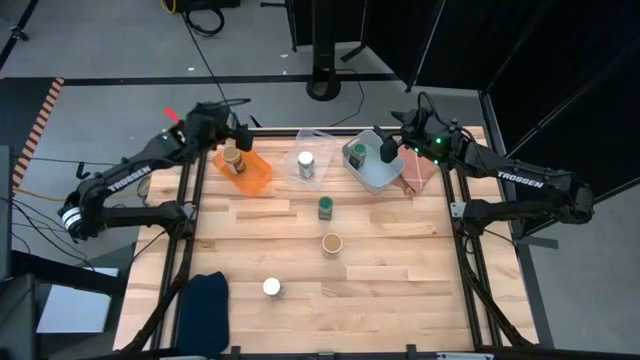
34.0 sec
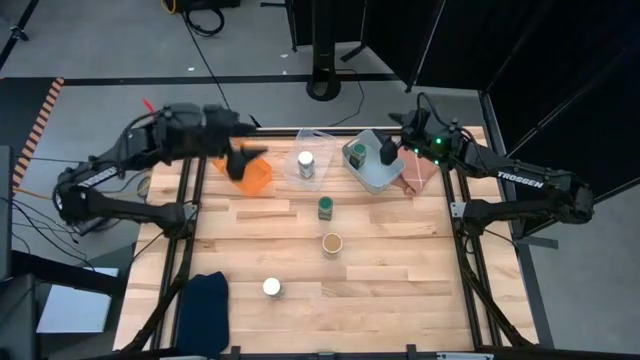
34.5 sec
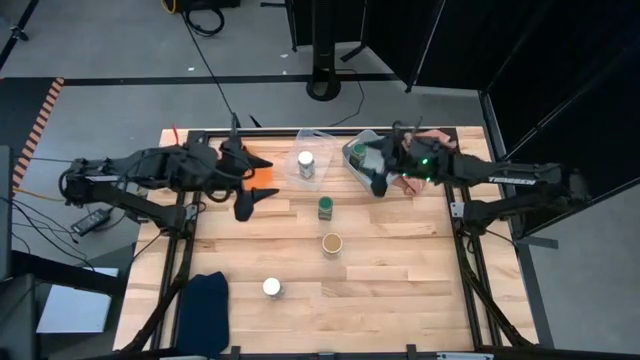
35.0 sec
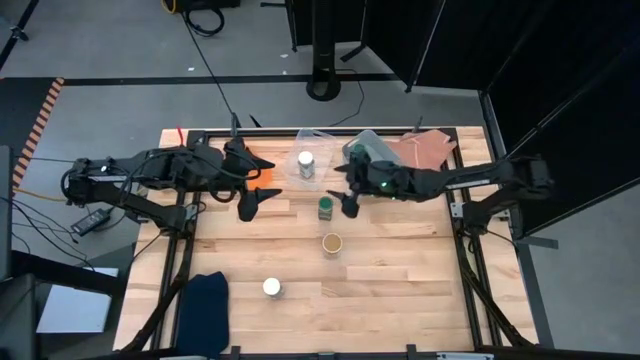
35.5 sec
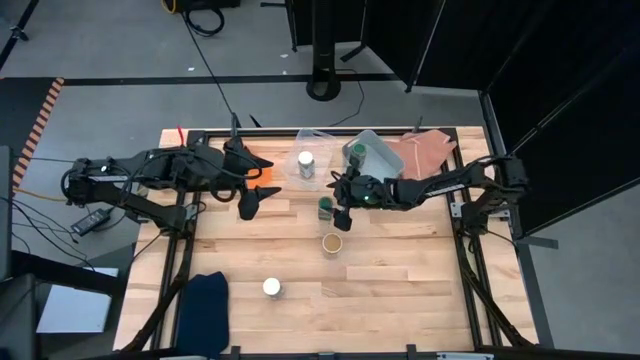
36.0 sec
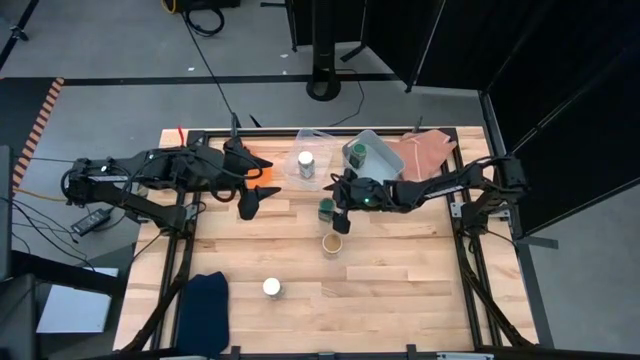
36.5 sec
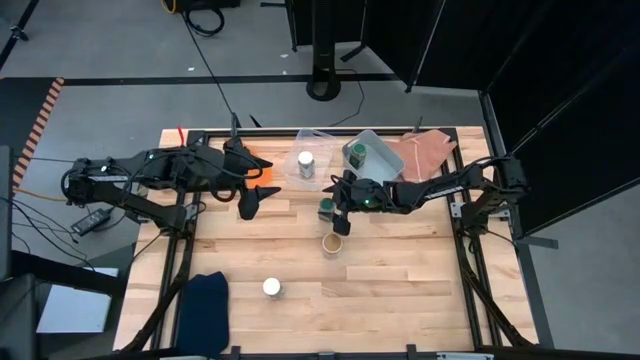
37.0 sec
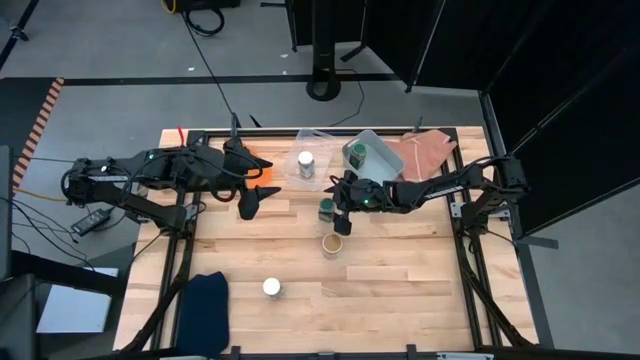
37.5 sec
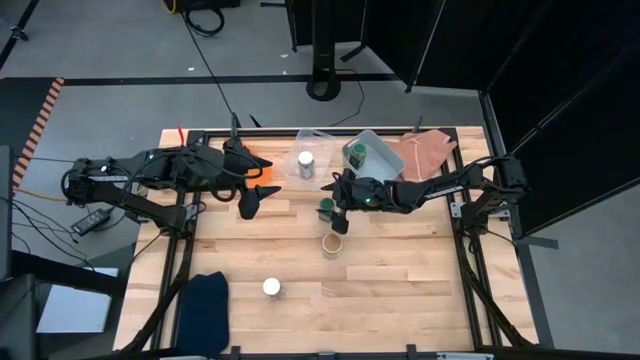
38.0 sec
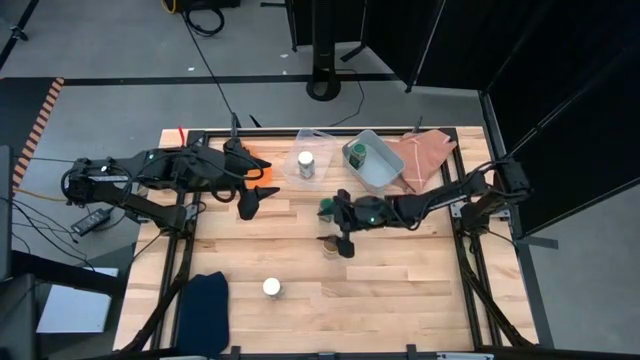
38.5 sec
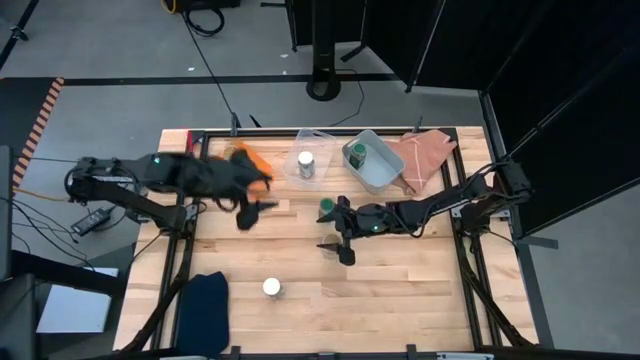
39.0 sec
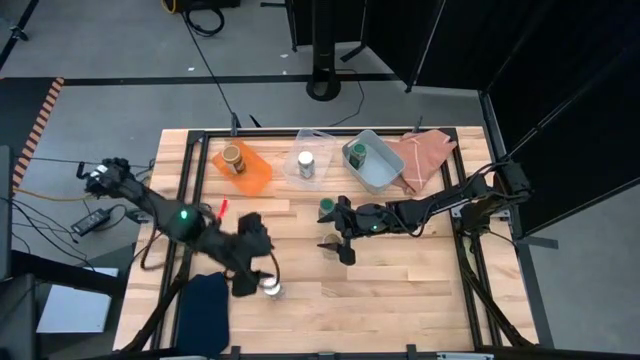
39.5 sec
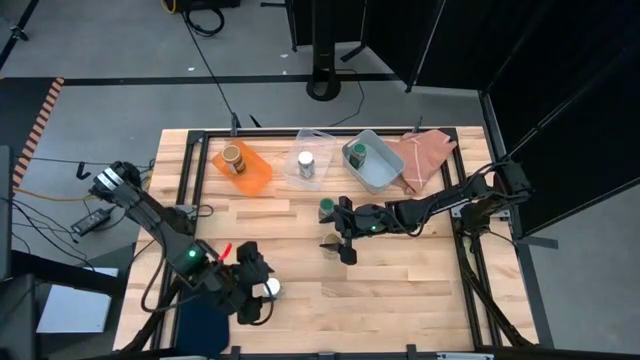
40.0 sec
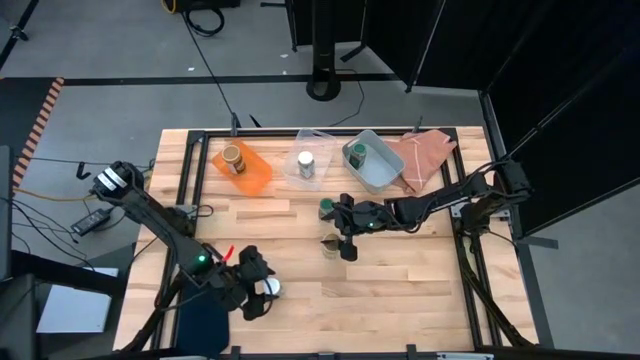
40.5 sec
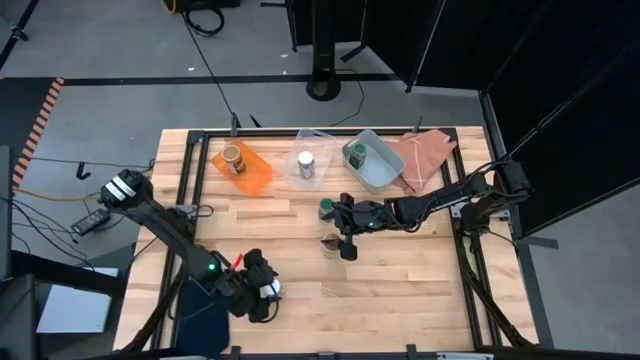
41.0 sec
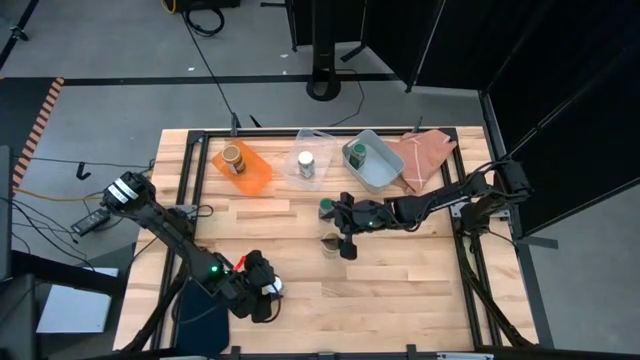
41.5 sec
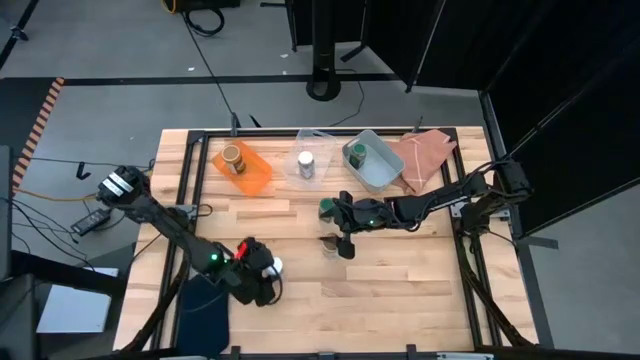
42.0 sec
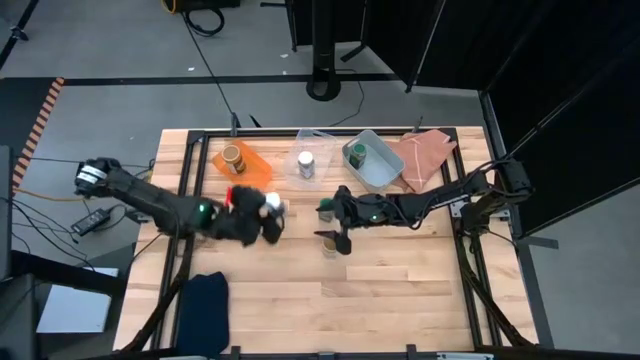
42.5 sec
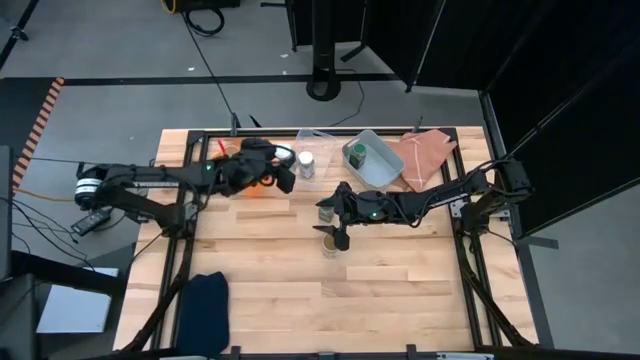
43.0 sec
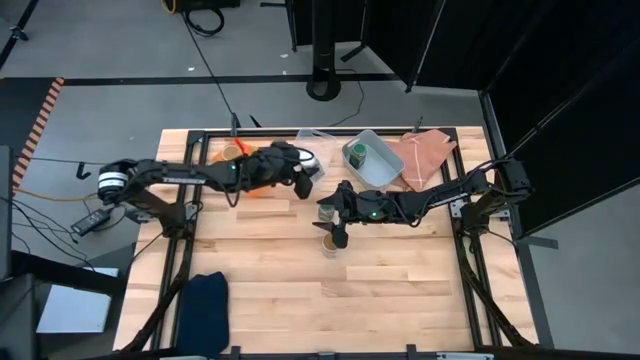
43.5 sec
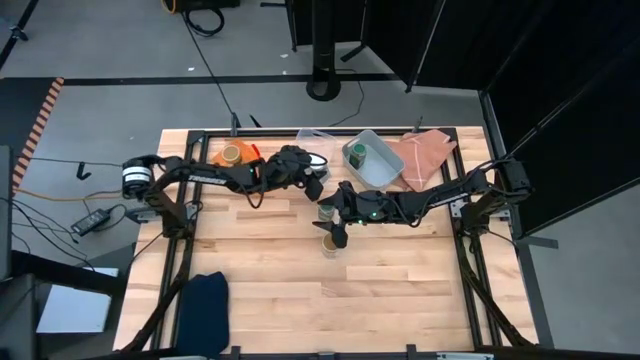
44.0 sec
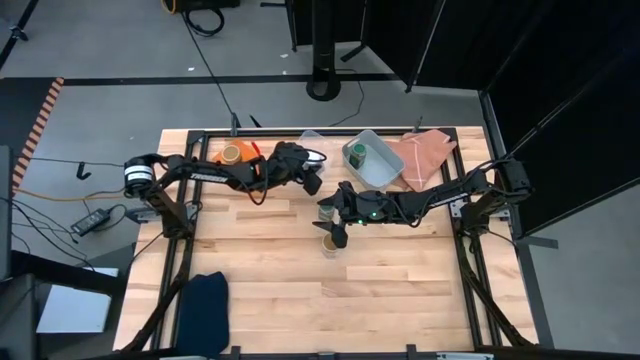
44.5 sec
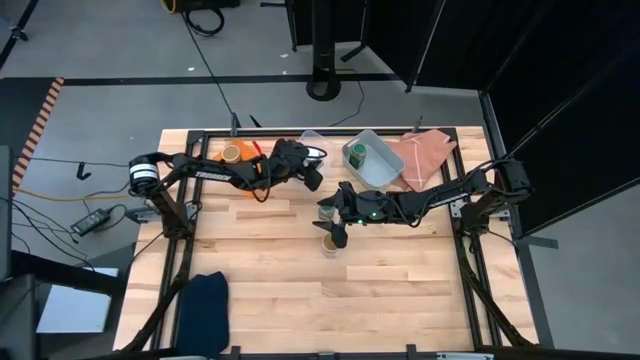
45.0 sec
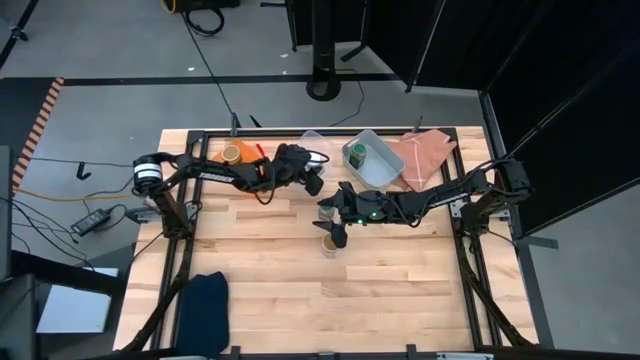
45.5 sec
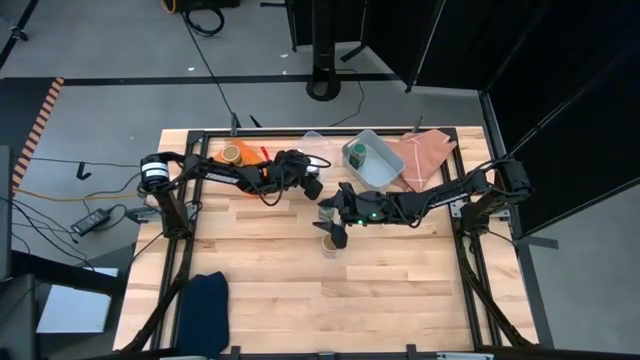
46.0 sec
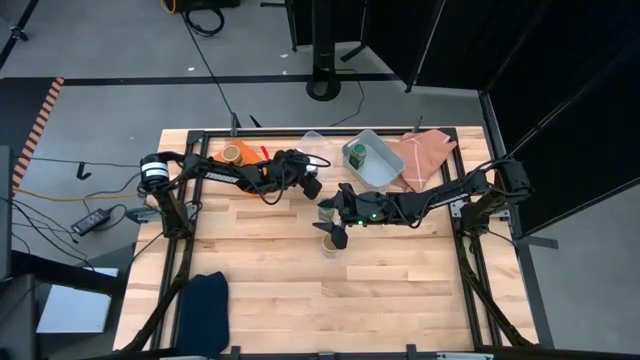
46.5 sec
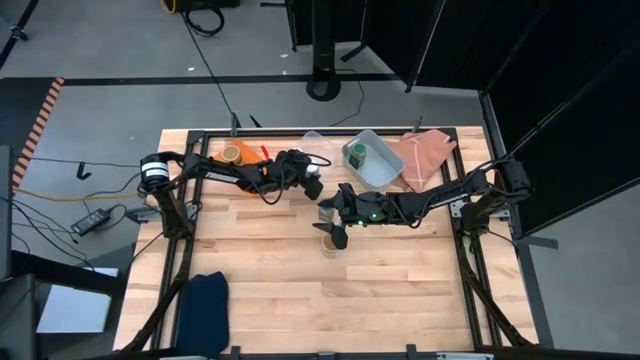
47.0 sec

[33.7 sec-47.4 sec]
Task: Sort spices by type
Put the white seasoning bottle into the transparent bin

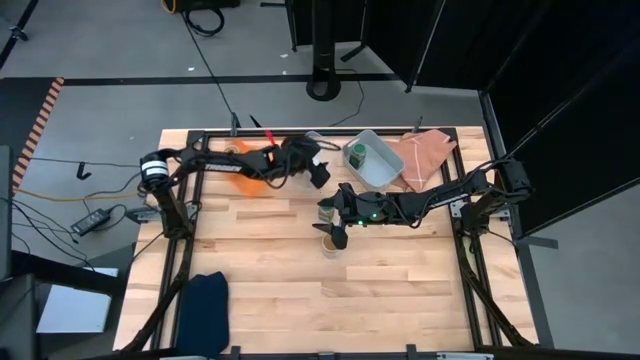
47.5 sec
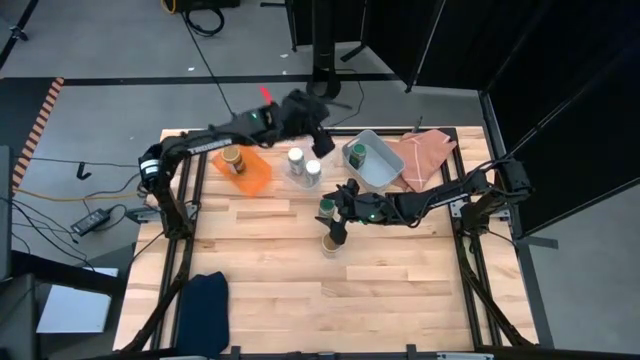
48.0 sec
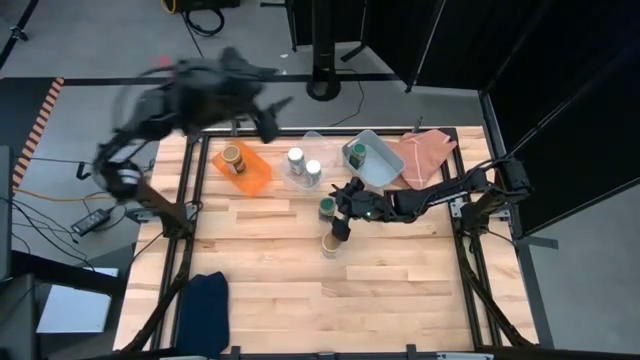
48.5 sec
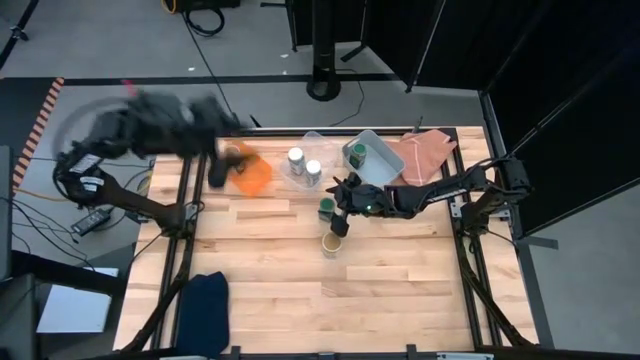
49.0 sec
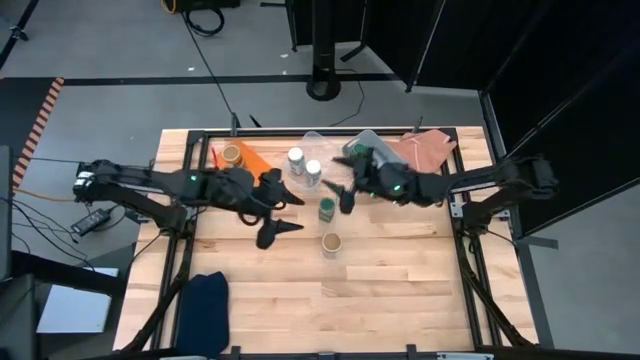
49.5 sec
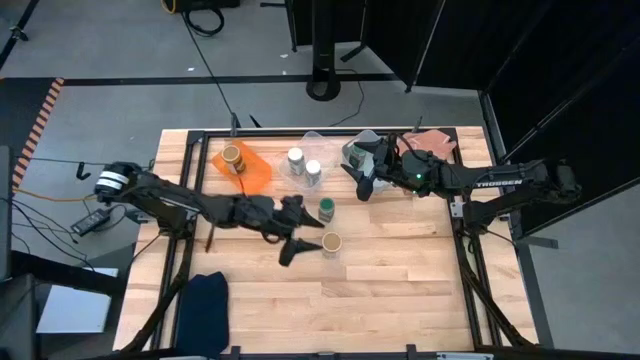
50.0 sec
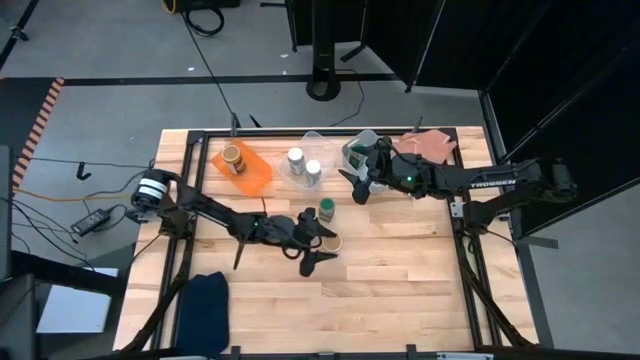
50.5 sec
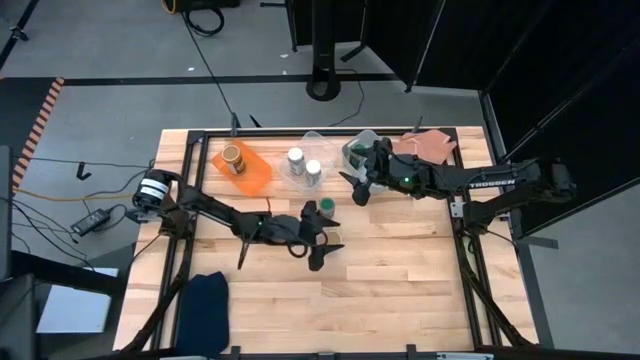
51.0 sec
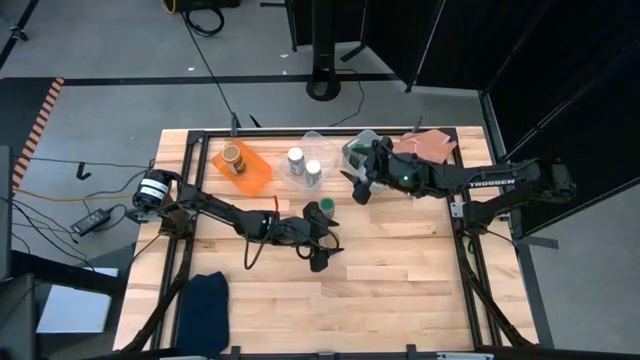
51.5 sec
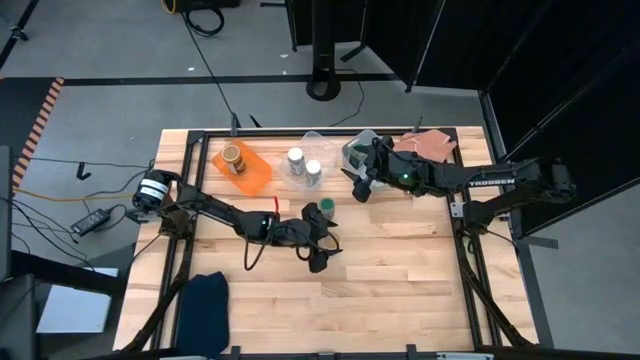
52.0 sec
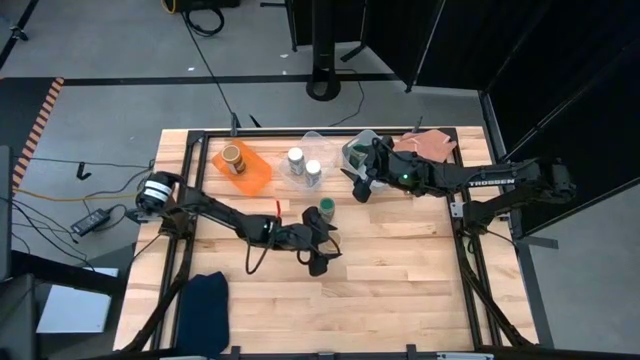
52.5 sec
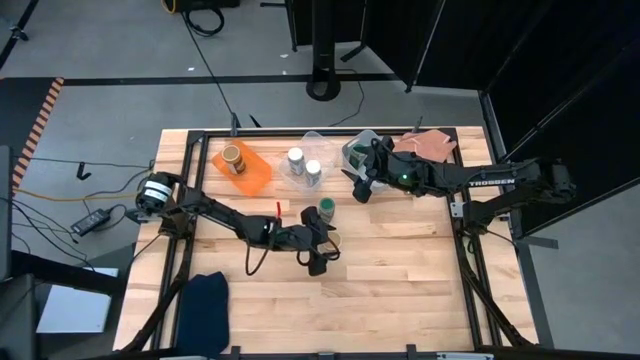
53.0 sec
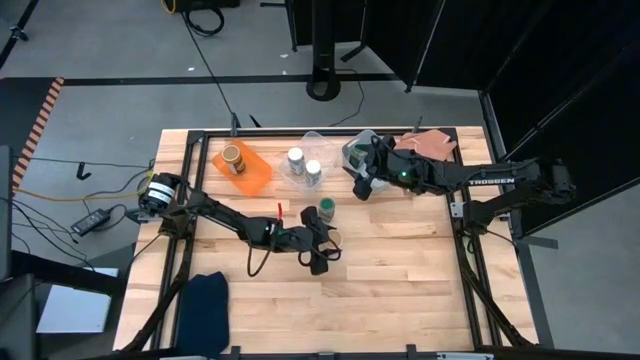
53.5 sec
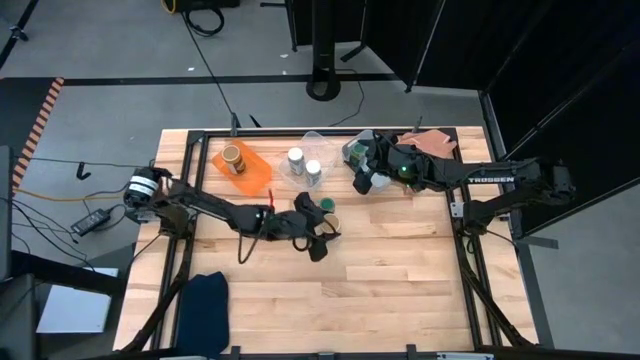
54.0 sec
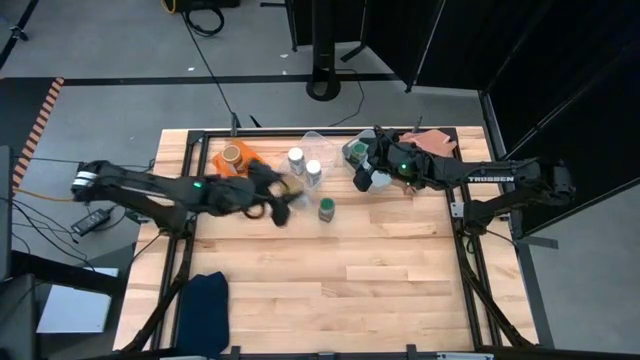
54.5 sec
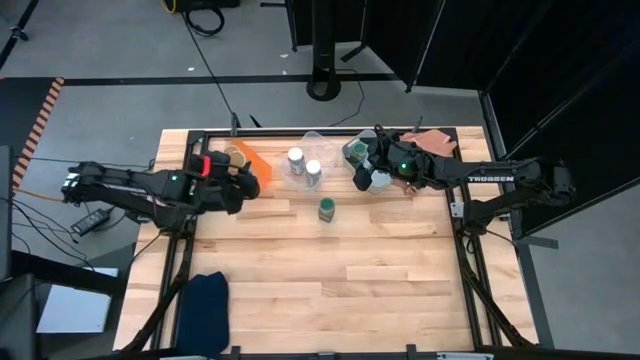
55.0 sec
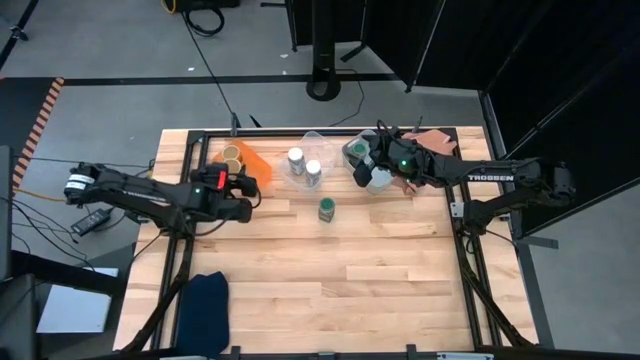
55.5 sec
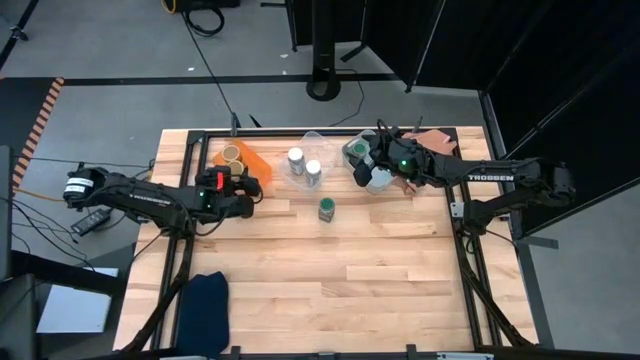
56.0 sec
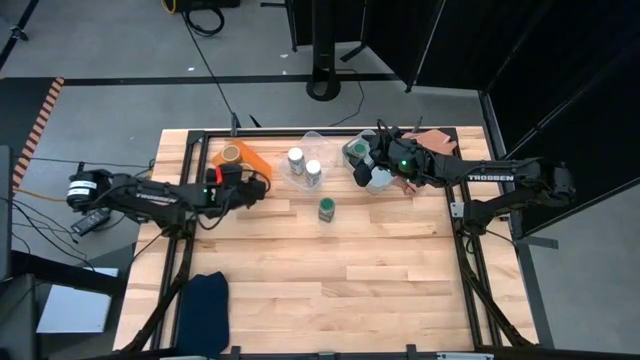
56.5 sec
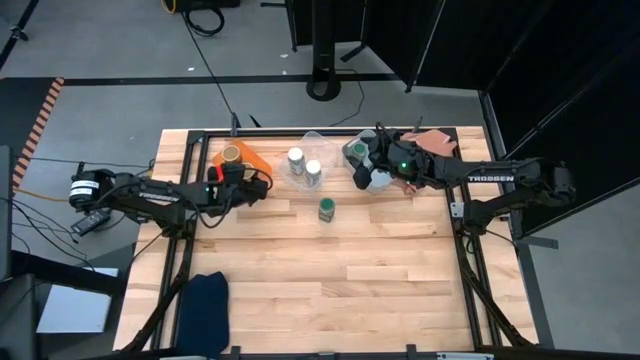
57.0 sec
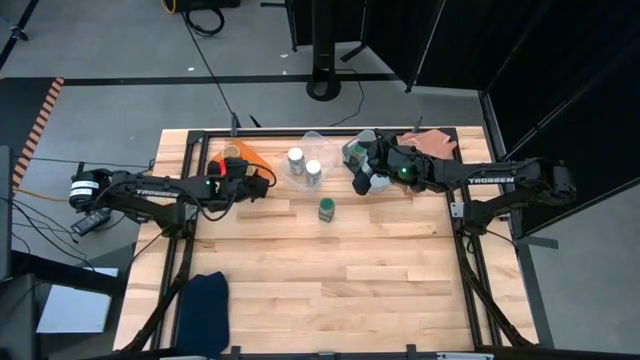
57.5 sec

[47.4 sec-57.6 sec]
Put the gold seasoning bottle into the orange bin
